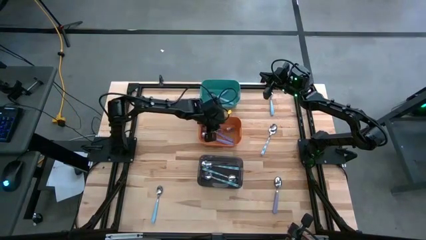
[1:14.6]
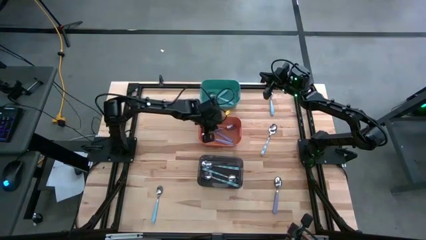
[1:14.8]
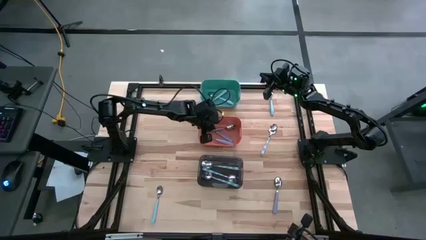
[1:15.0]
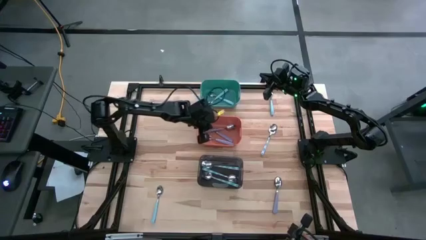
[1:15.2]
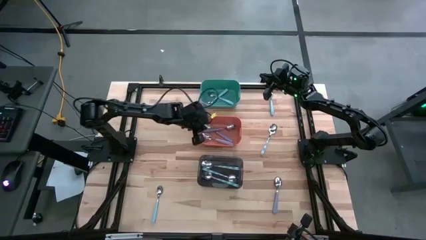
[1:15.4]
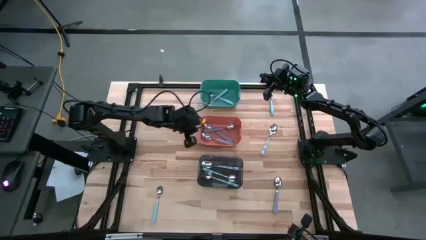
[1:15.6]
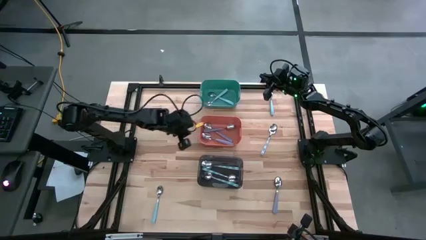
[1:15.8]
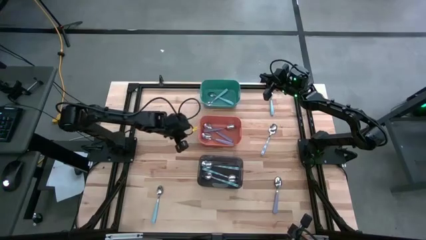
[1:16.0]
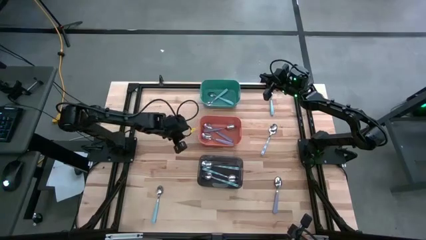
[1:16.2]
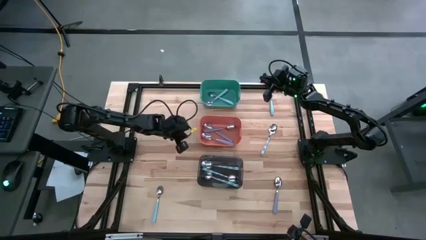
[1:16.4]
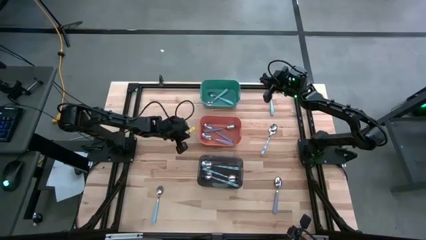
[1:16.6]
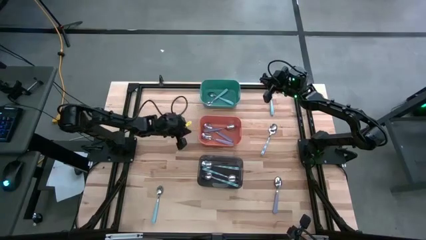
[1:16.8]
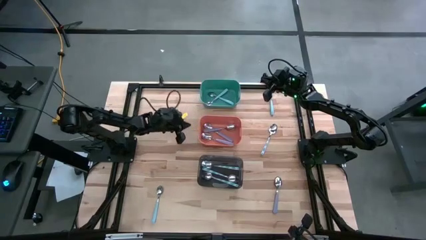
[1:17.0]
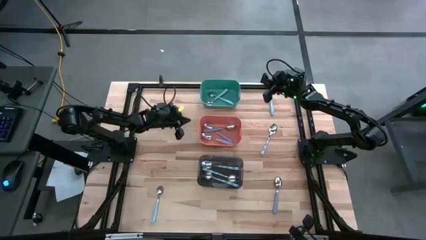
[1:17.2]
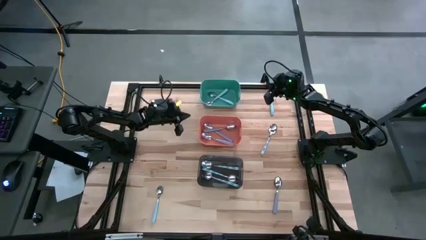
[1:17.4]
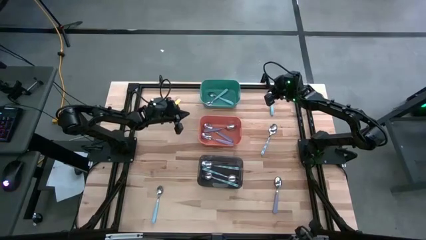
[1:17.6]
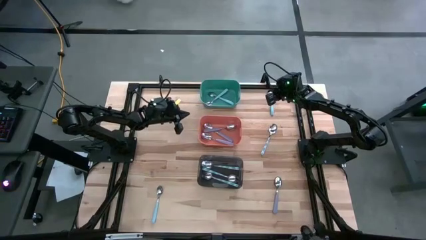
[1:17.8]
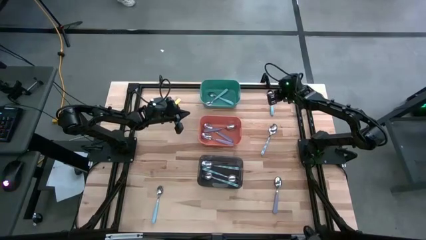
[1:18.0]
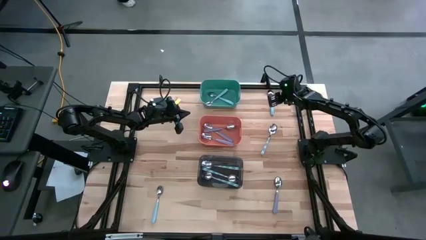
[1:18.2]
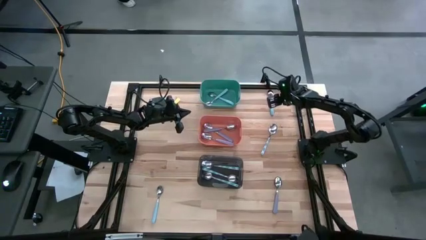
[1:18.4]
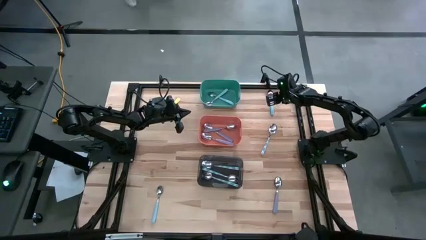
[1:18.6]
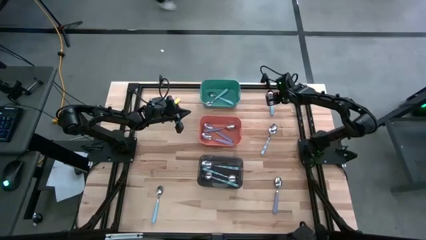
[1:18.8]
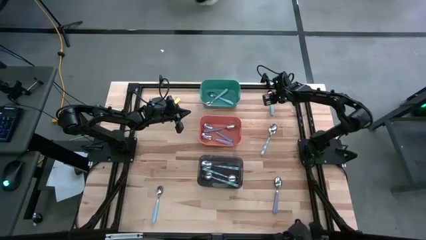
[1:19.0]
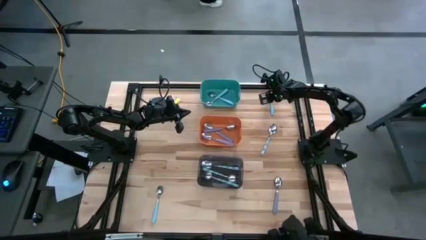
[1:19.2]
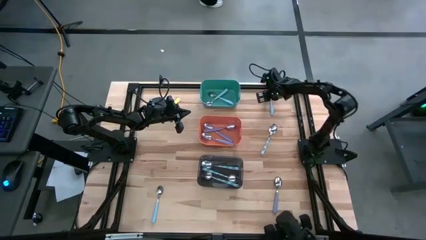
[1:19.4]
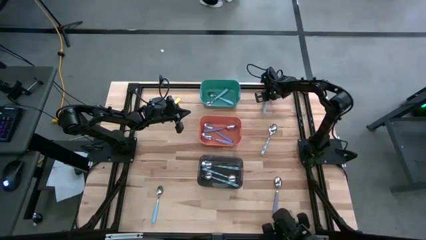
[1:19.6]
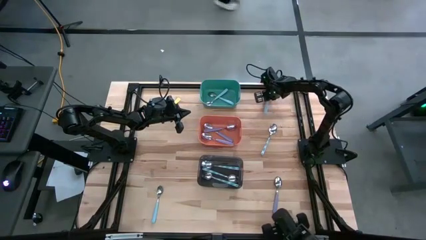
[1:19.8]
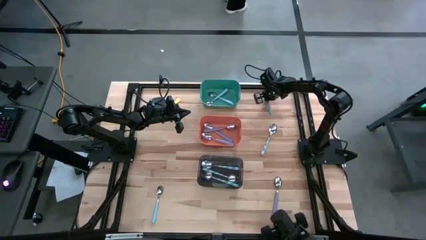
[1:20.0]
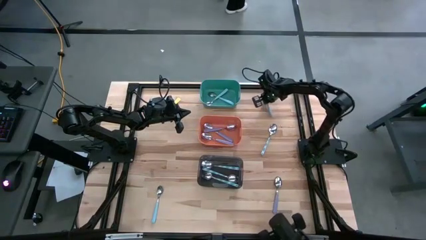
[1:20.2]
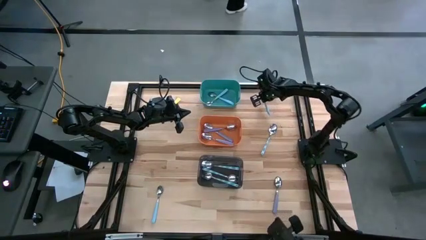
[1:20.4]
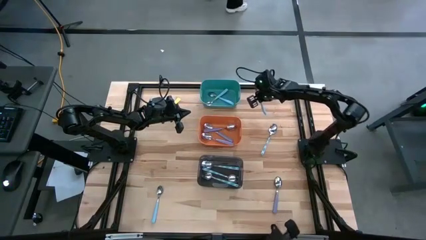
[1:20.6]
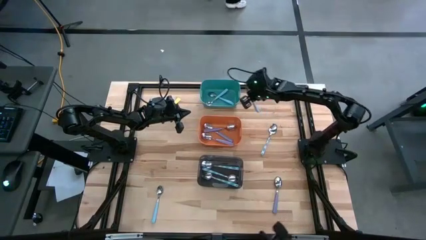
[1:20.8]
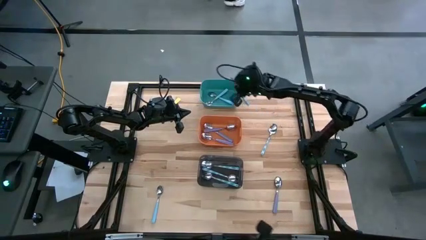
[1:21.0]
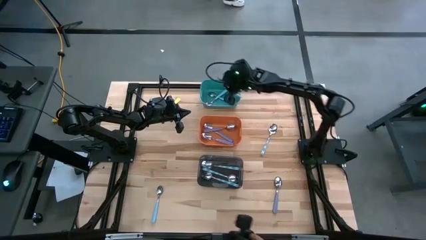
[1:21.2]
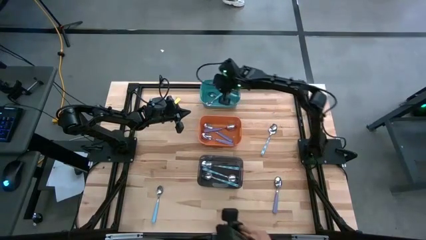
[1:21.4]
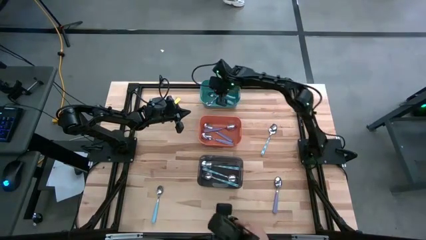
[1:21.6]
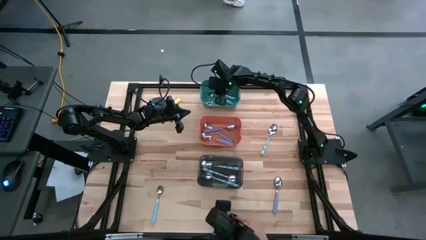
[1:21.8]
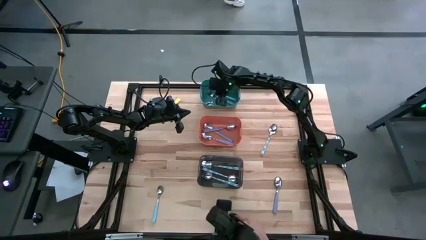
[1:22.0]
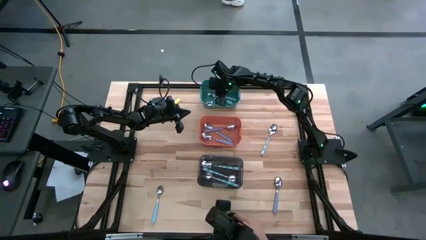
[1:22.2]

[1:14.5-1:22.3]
Task: Sort silverware by color (type)
Put the top blue spoon into the blue bin

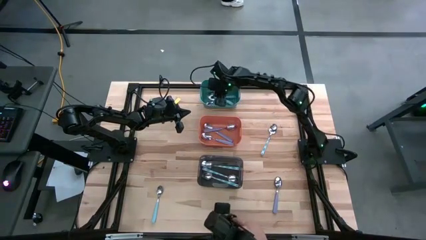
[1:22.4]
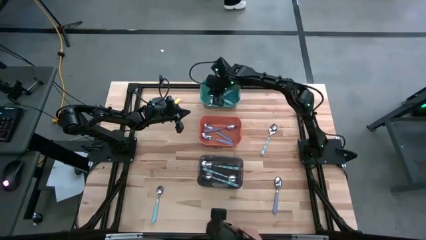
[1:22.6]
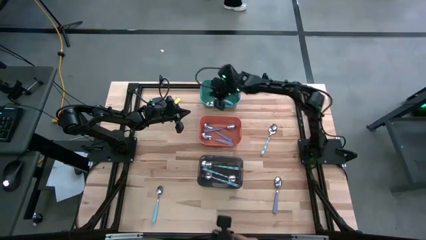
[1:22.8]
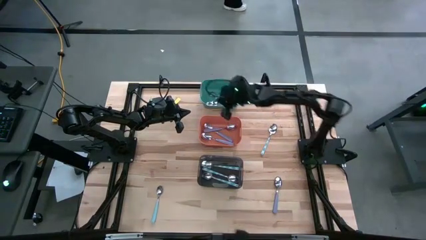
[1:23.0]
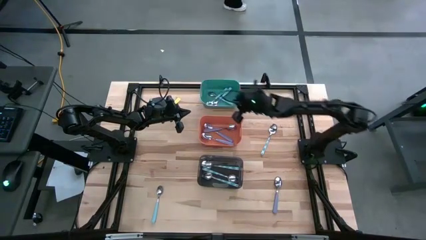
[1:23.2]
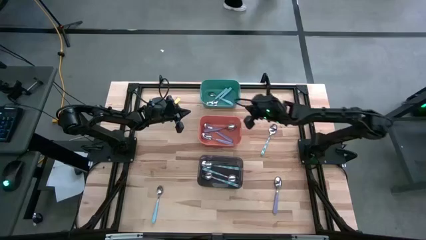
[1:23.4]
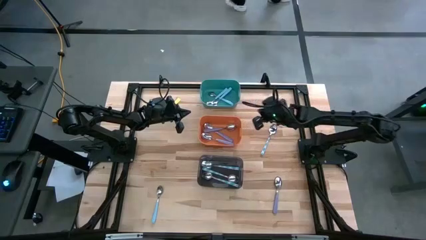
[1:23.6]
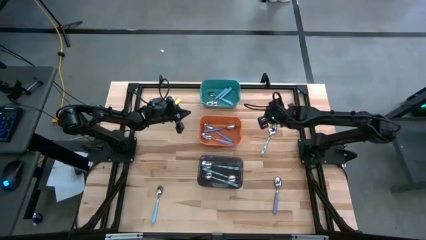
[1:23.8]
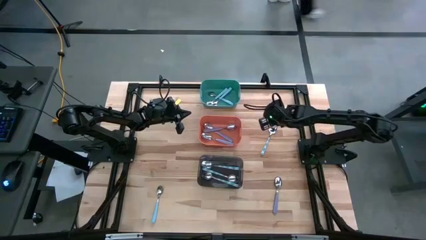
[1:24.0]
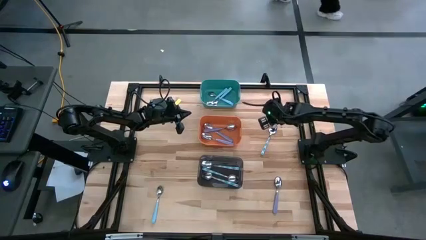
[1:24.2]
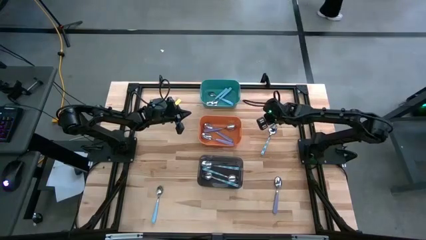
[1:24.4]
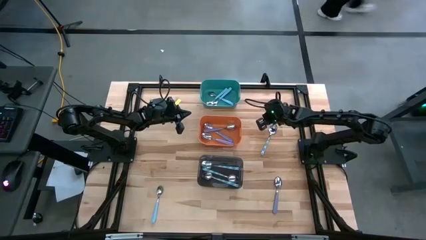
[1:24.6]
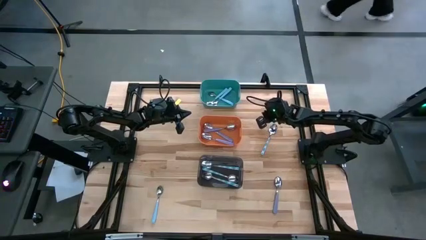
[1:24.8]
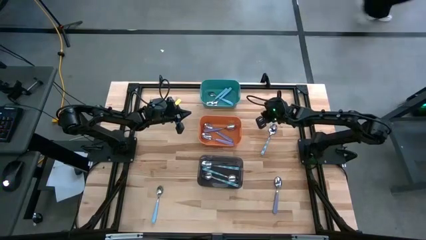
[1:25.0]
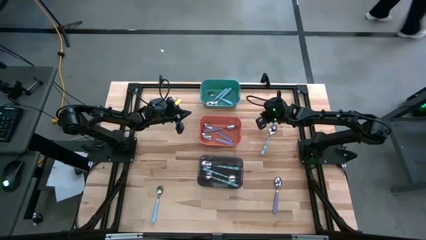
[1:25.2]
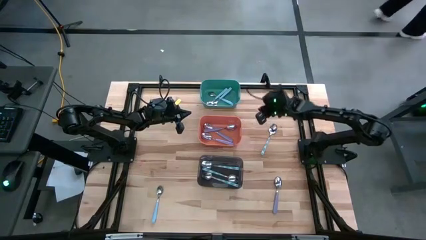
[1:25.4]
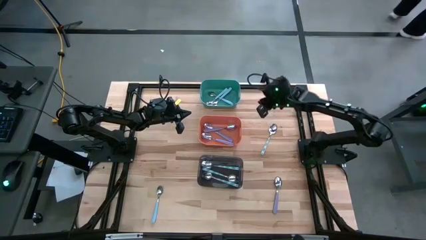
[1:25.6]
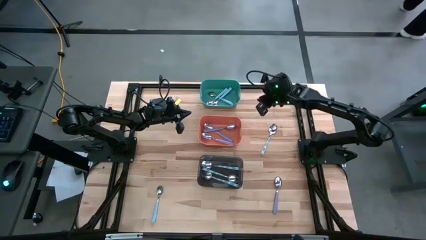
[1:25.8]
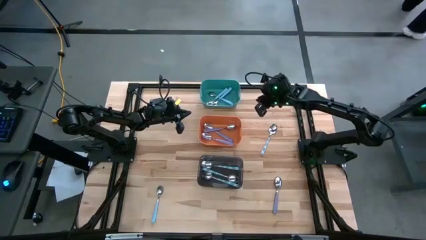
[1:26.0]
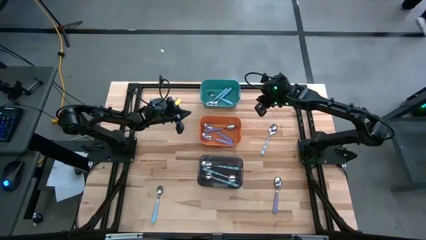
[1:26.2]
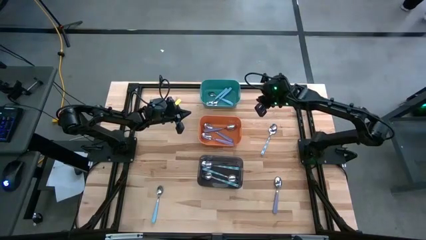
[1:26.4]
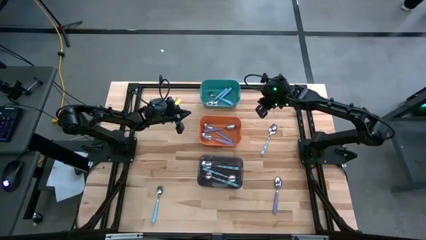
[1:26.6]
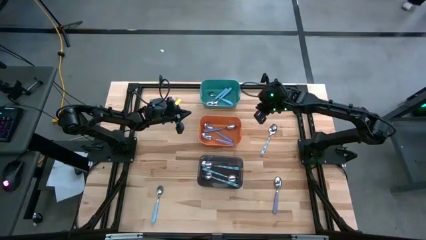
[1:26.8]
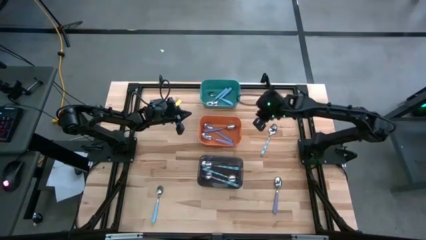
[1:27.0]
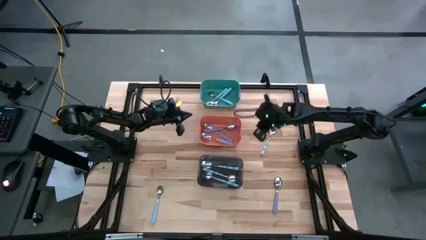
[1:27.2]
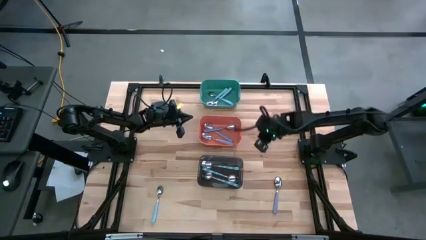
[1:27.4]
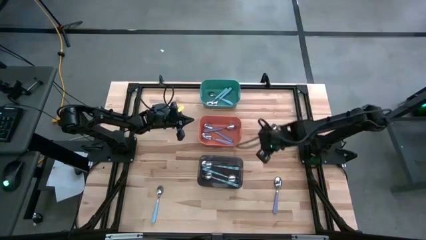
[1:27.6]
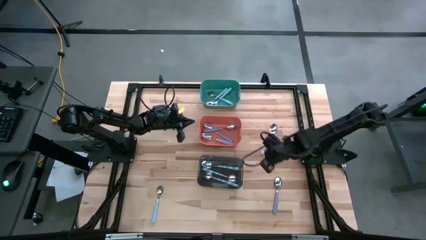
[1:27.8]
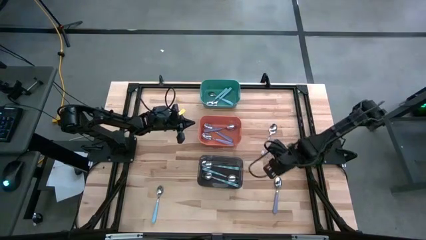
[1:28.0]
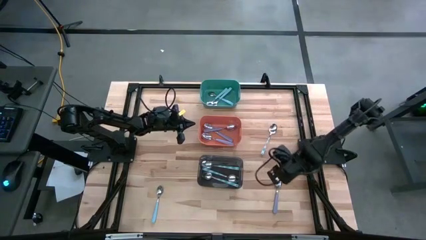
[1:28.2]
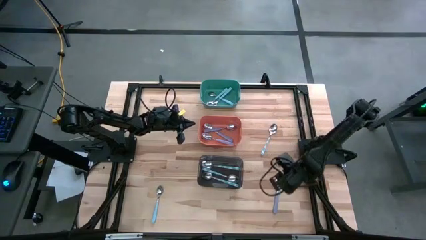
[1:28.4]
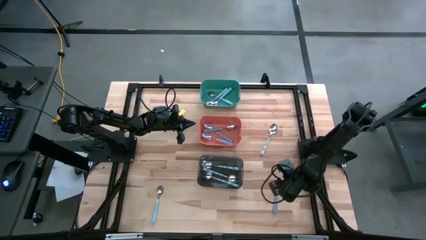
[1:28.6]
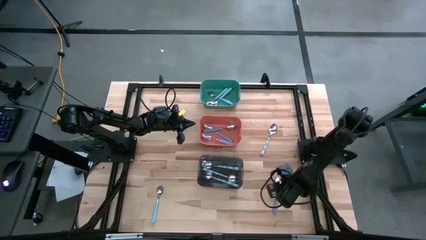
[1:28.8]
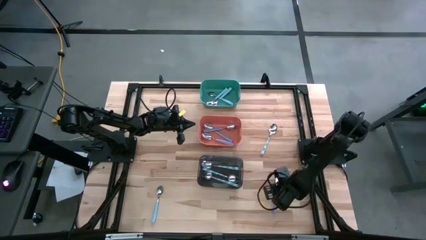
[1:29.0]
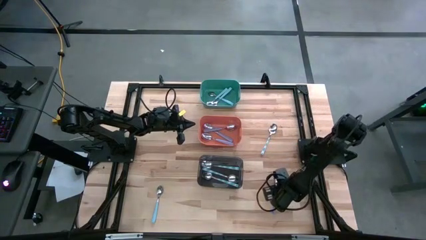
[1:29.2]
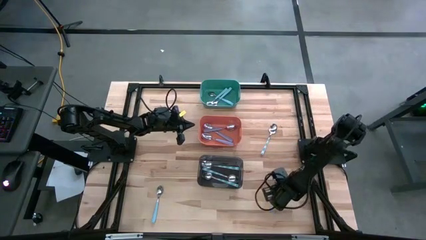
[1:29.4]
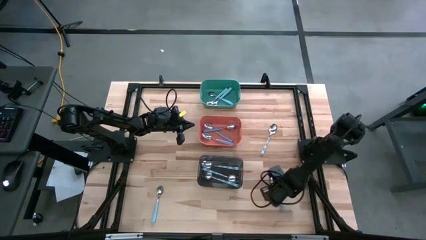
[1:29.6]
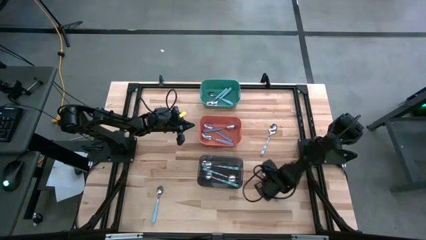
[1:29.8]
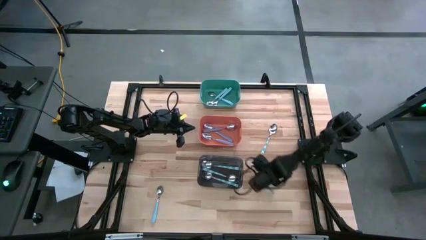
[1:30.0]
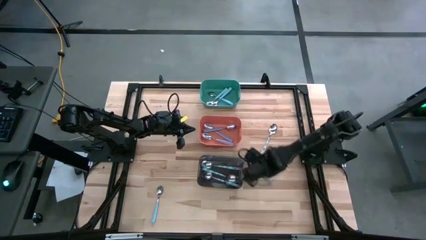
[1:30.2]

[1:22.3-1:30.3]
Put the violet spoon into the orange bin
